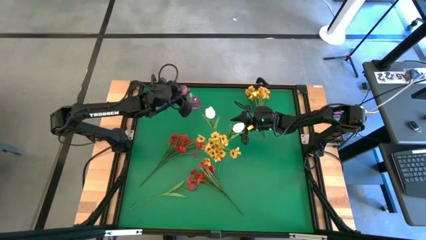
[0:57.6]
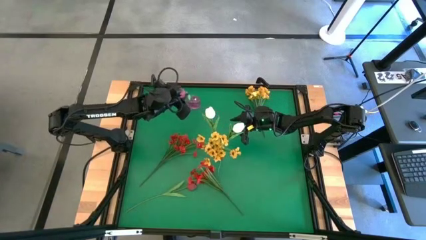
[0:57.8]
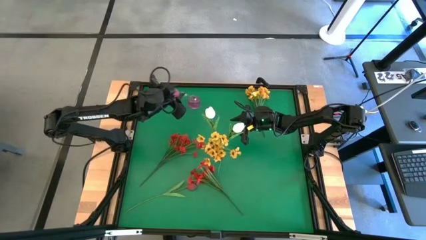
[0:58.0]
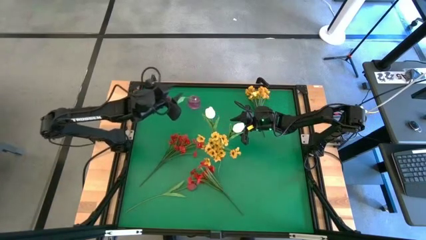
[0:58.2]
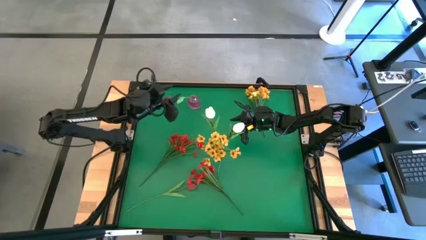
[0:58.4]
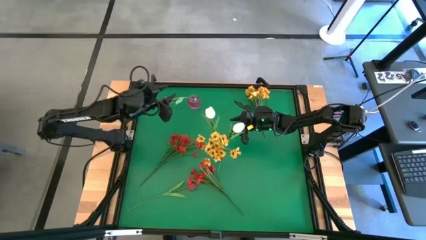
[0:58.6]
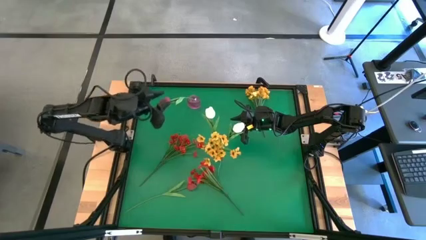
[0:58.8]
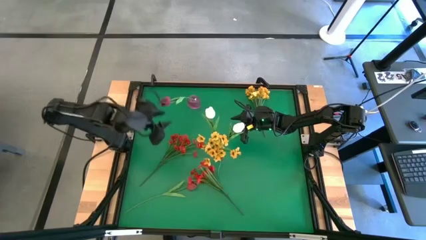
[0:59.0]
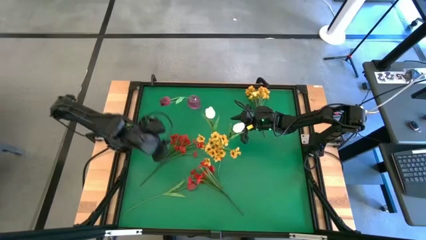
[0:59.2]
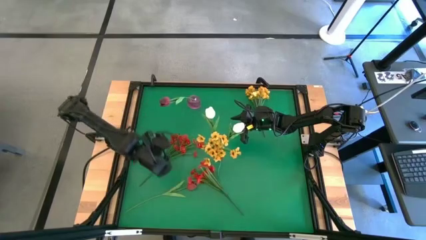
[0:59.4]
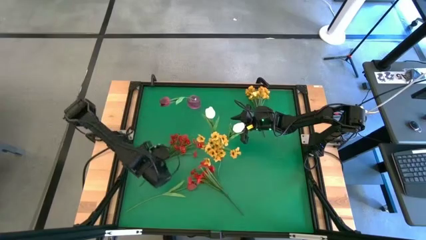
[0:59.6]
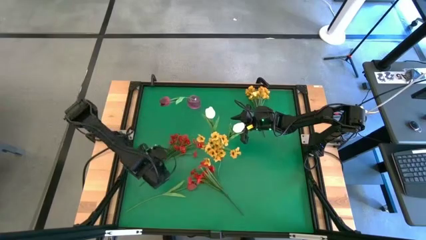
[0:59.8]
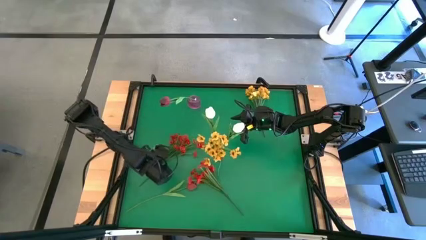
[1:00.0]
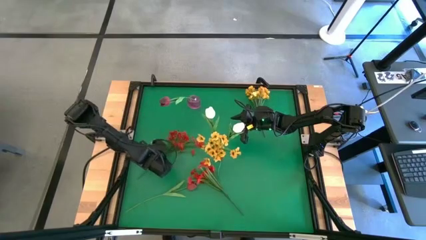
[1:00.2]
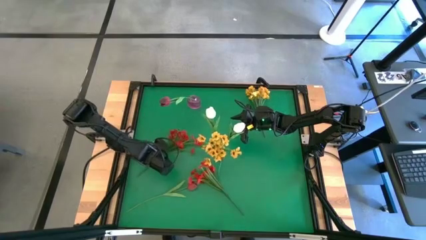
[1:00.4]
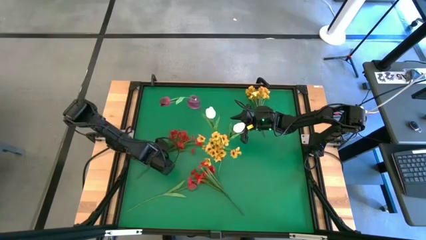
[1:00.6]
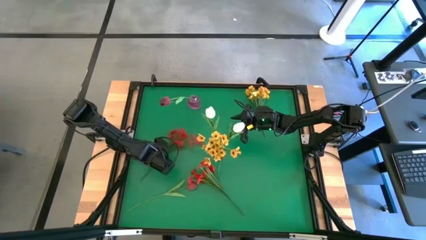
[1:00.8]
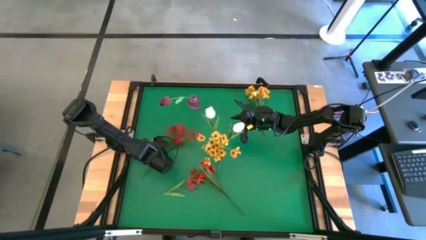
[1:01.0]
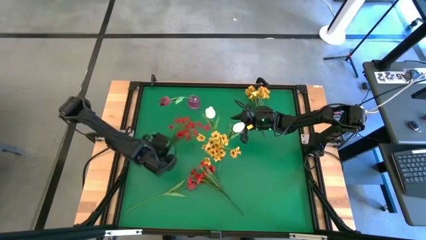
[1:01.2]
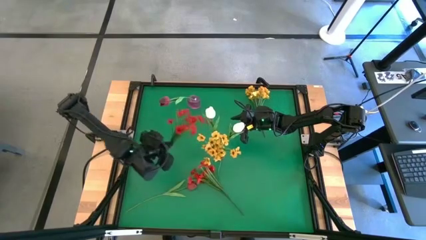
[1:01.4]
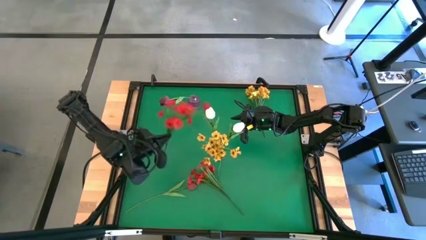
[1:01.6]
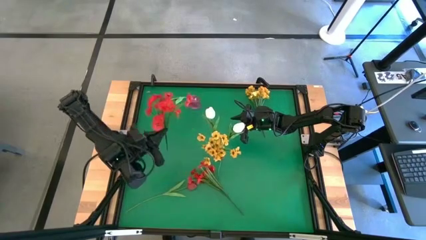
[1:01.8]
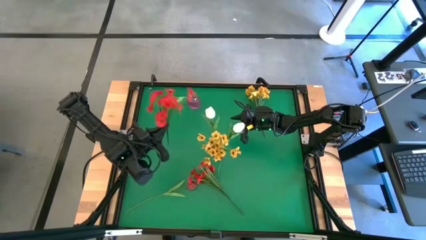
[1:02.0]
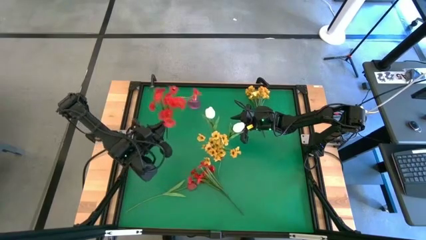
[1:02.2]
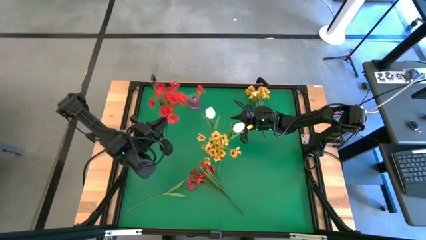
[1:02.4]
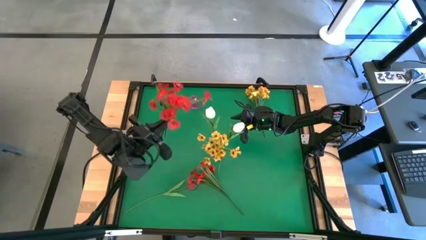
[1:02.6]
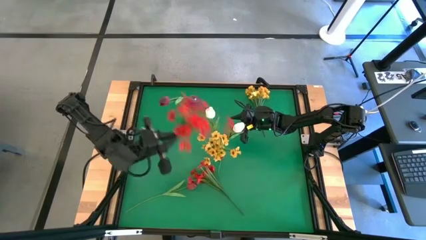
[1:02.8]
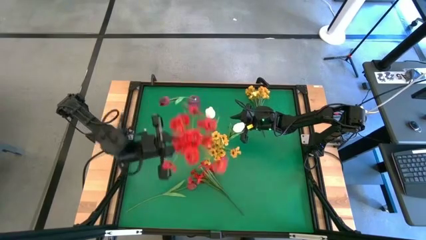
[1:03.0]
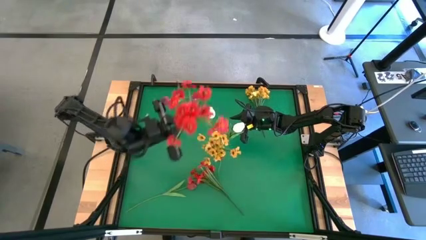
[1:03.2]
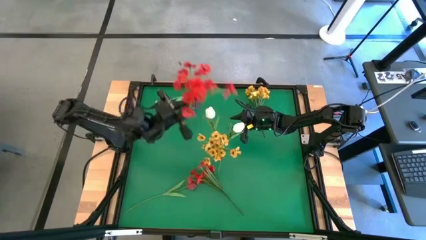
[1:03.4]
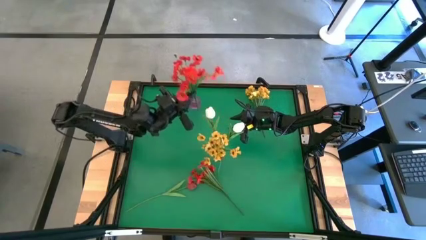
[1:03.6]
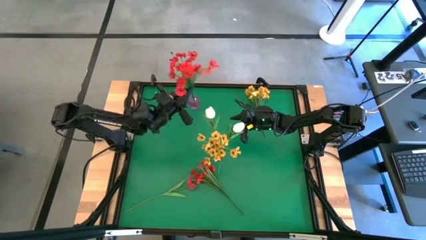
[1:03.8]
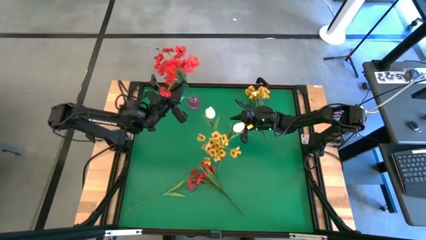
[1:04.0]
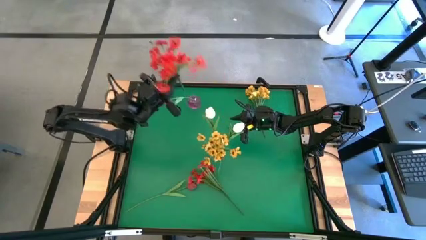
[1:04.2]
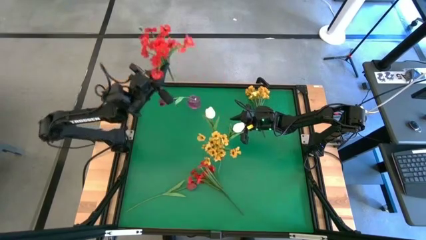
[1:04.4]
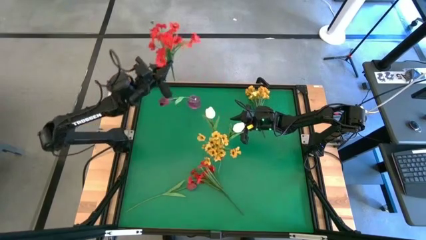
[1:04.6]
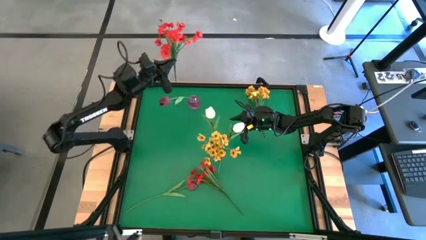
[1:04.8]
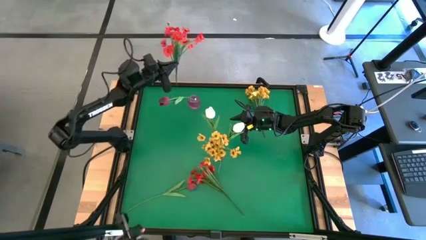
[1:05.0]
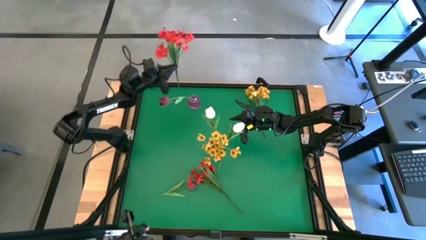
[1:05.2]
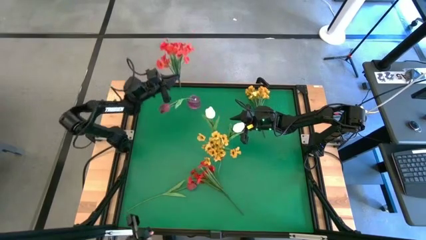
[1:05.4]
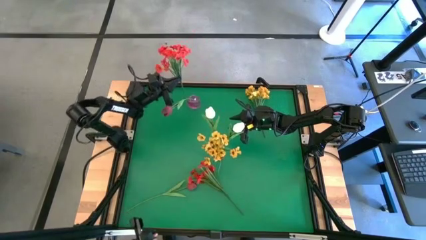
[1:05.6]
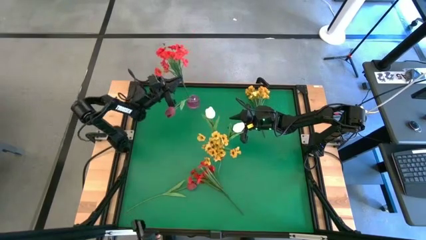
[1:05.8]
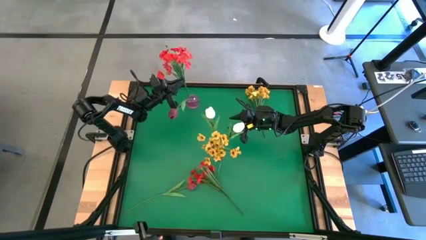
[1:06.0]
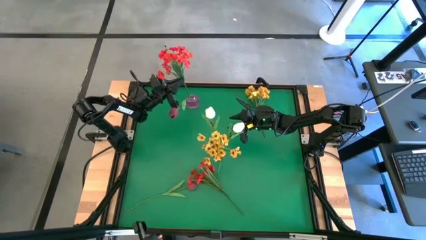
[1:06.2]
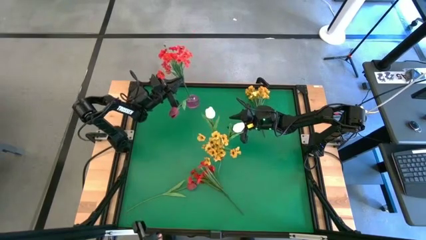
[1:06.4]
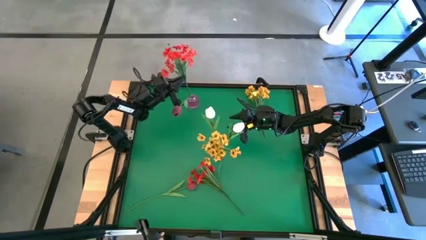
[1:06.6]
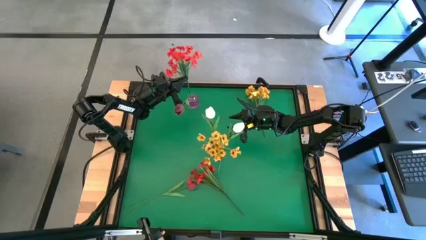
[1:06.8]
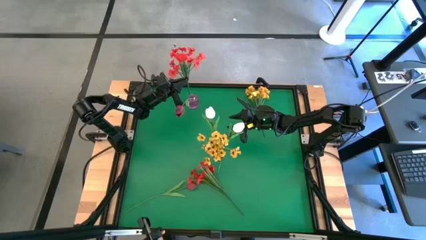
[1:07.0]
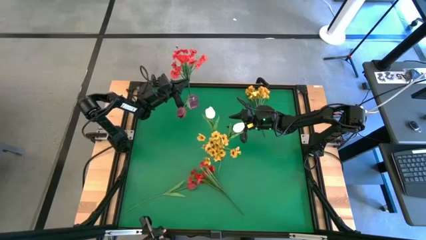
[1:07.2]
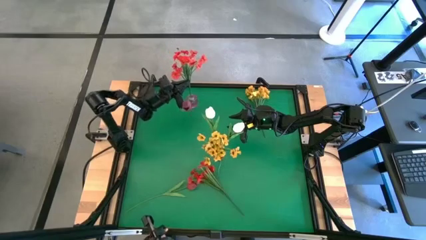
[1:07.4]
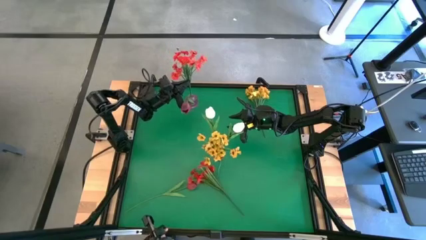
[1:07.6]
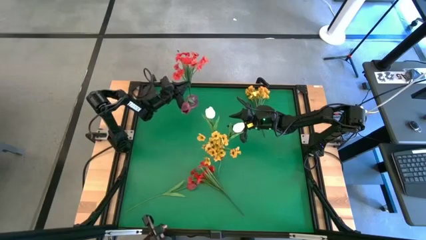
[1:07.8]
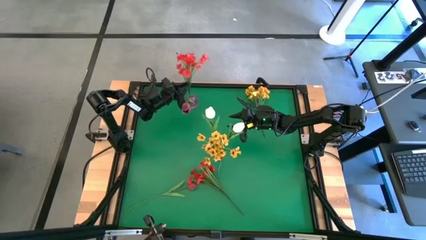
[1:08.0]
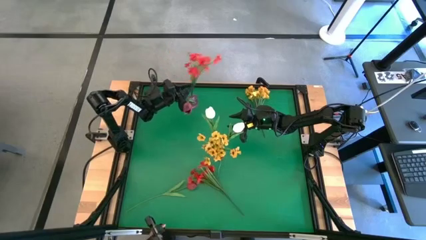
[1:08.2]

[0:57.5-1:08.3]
Task: Sort flowers into vase by color
Put the top red flowers into the pink vase
